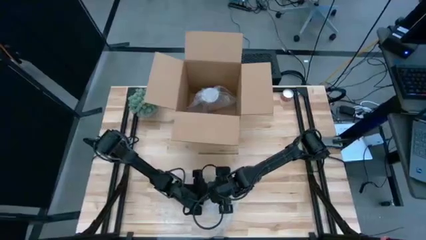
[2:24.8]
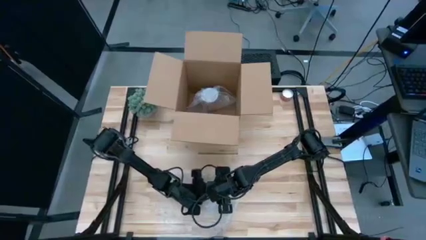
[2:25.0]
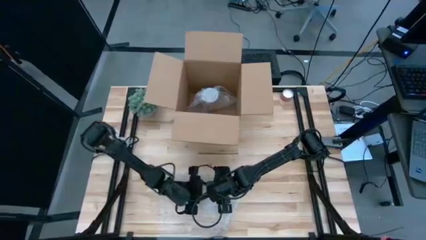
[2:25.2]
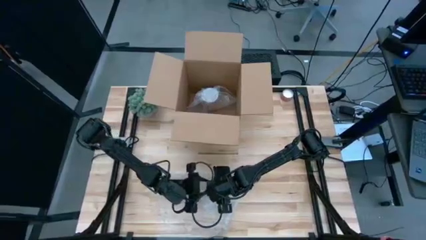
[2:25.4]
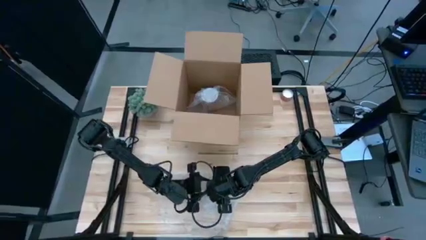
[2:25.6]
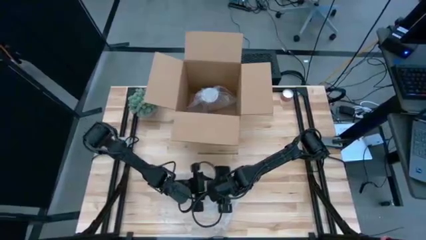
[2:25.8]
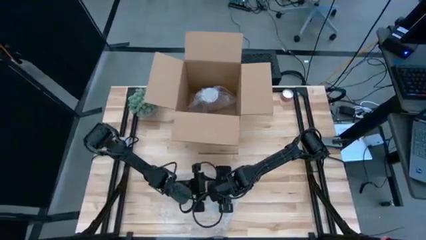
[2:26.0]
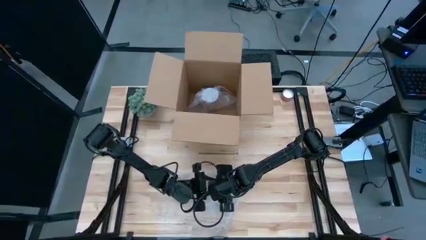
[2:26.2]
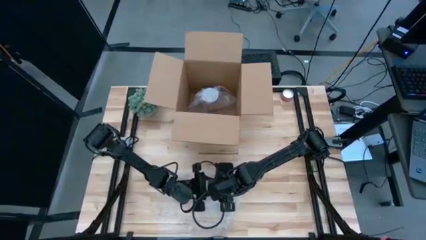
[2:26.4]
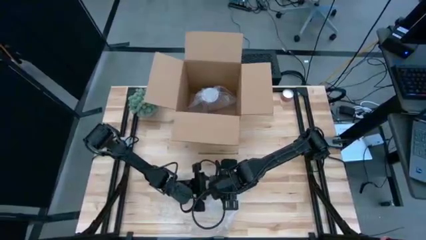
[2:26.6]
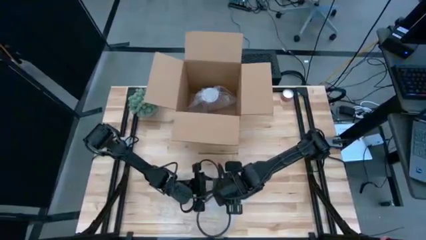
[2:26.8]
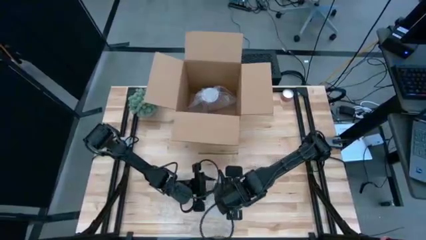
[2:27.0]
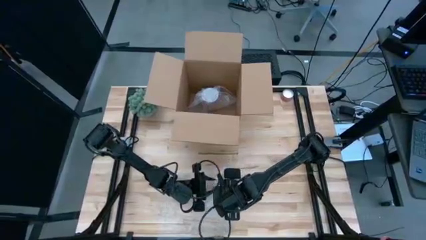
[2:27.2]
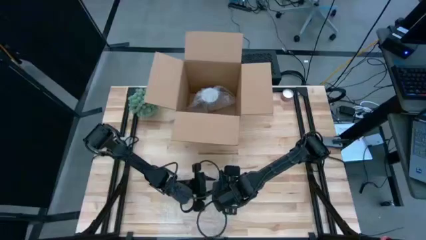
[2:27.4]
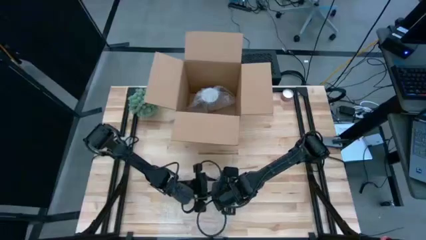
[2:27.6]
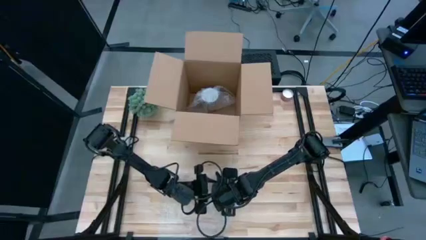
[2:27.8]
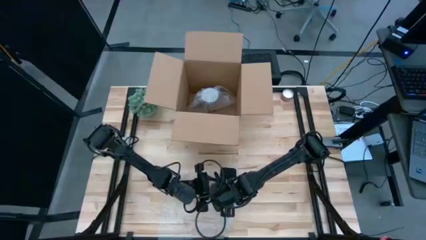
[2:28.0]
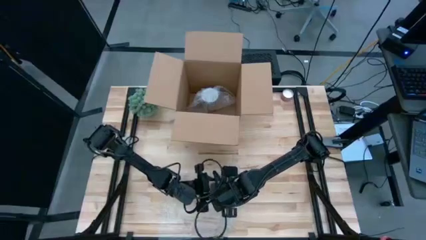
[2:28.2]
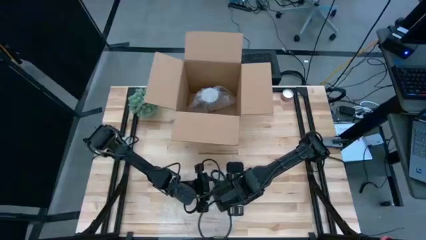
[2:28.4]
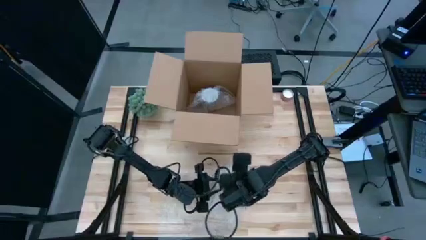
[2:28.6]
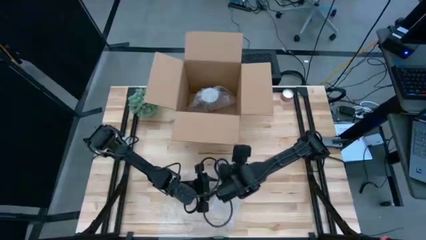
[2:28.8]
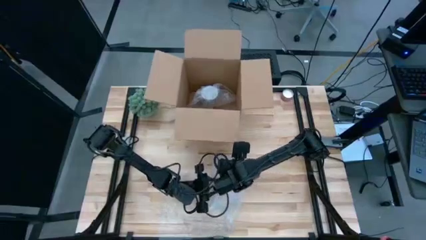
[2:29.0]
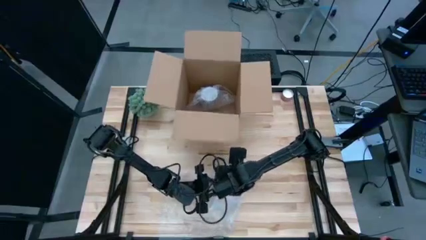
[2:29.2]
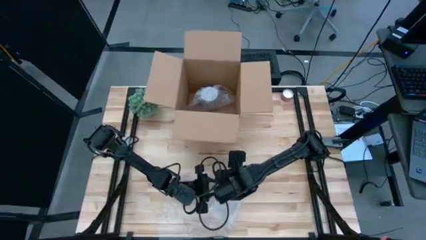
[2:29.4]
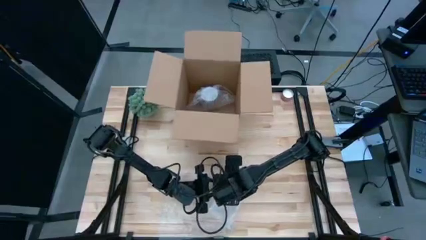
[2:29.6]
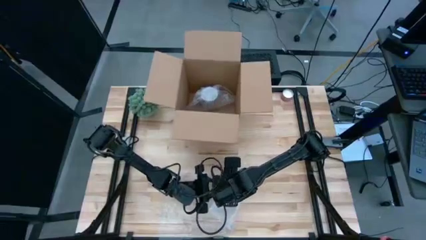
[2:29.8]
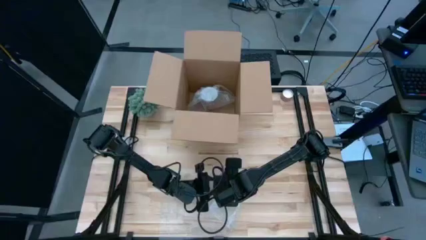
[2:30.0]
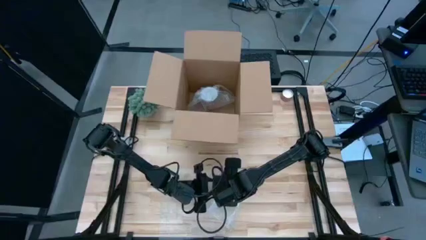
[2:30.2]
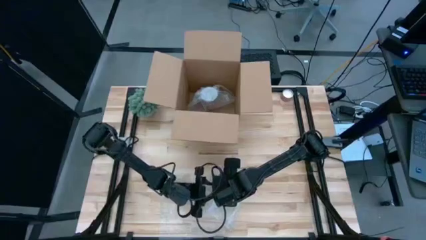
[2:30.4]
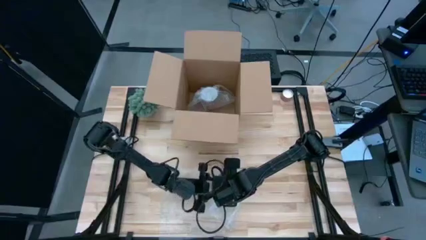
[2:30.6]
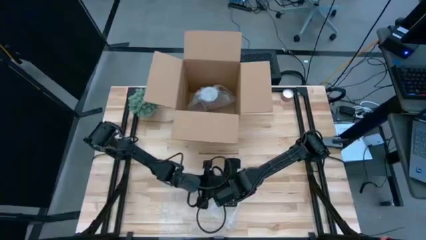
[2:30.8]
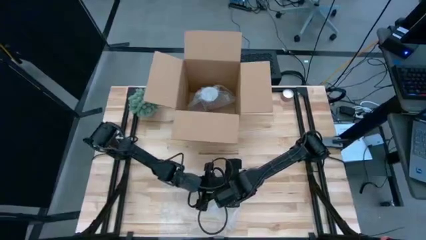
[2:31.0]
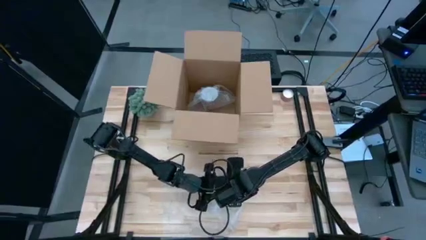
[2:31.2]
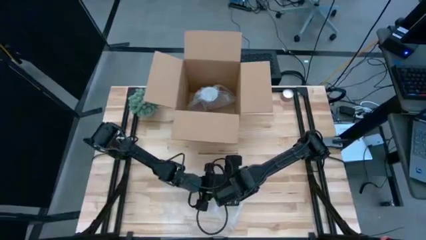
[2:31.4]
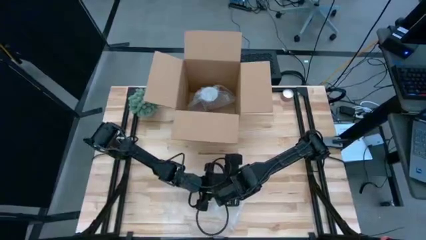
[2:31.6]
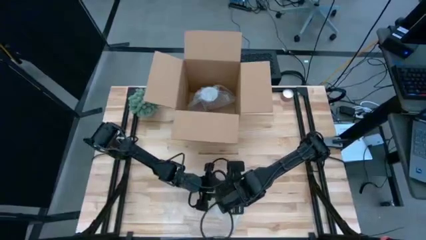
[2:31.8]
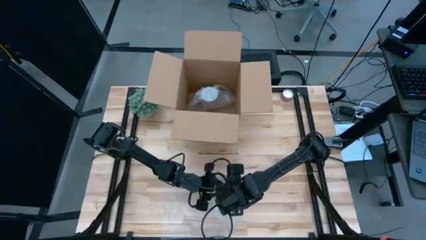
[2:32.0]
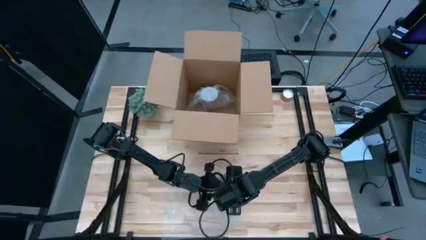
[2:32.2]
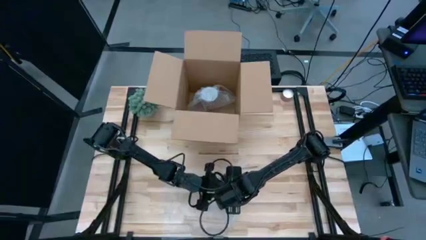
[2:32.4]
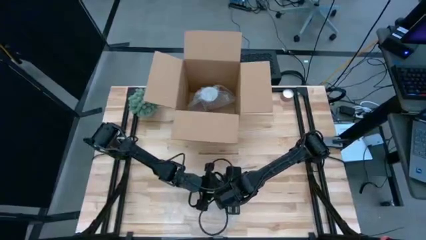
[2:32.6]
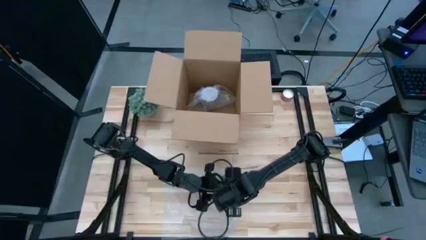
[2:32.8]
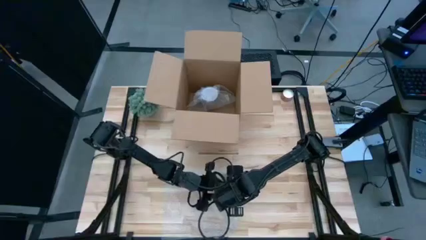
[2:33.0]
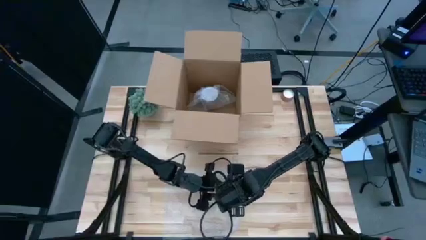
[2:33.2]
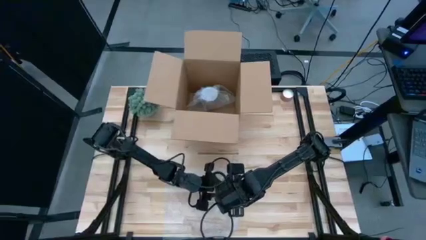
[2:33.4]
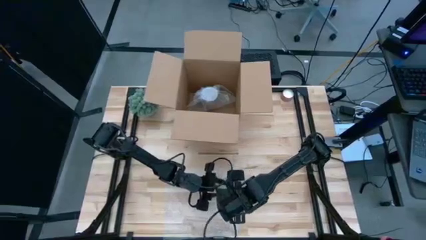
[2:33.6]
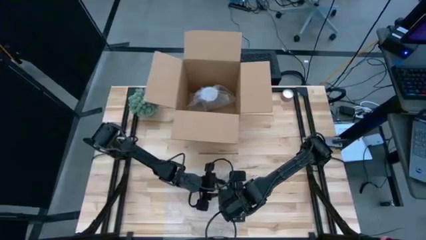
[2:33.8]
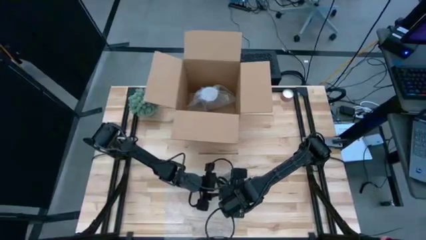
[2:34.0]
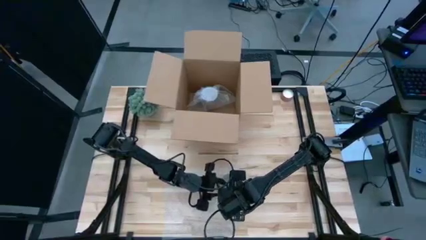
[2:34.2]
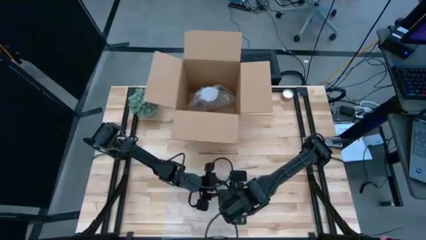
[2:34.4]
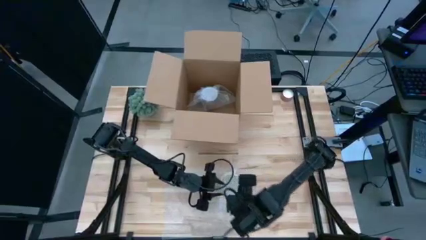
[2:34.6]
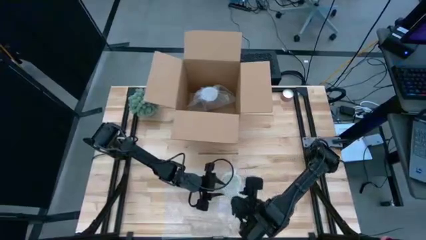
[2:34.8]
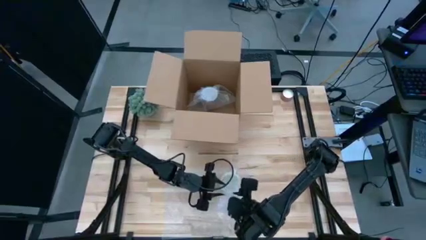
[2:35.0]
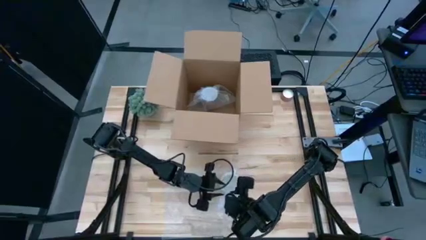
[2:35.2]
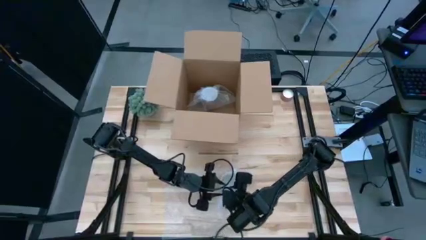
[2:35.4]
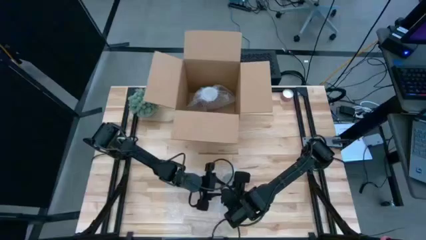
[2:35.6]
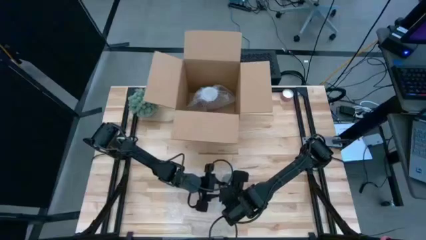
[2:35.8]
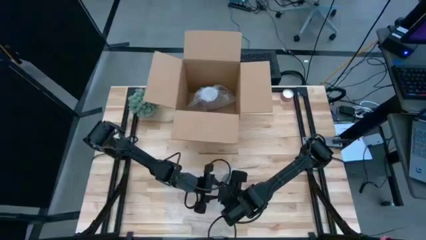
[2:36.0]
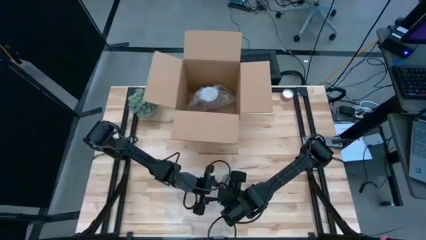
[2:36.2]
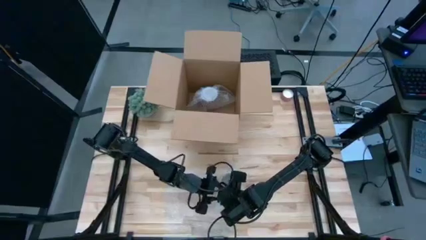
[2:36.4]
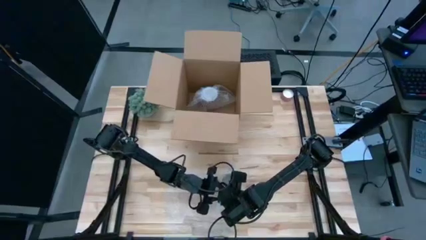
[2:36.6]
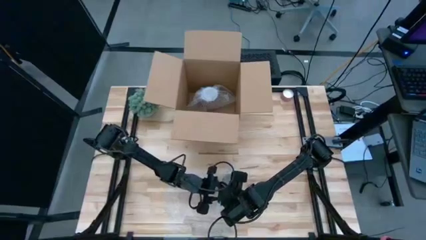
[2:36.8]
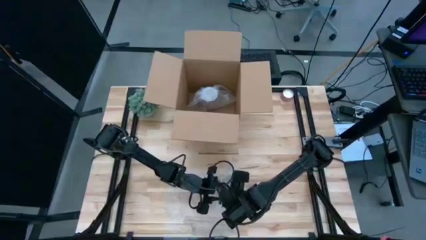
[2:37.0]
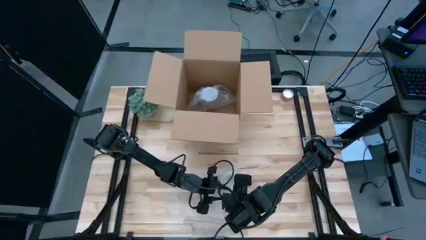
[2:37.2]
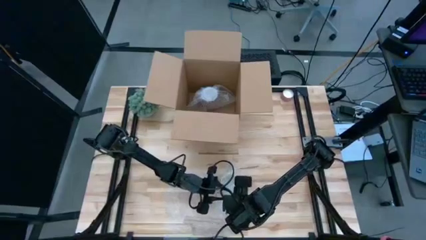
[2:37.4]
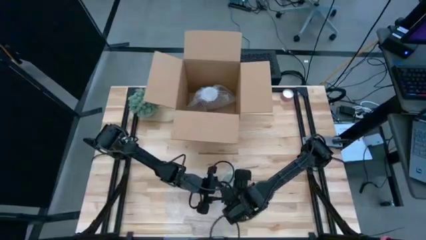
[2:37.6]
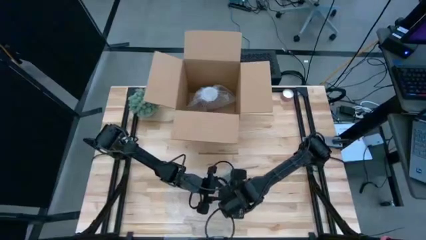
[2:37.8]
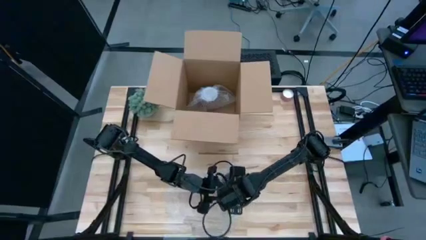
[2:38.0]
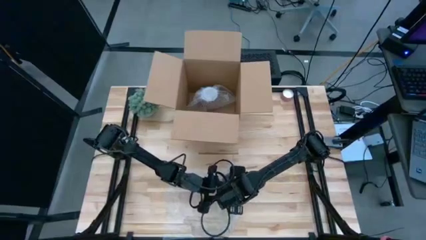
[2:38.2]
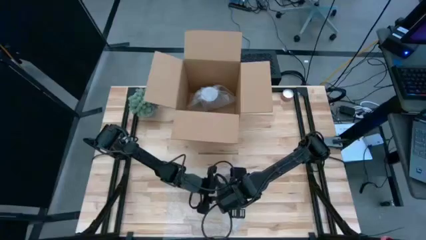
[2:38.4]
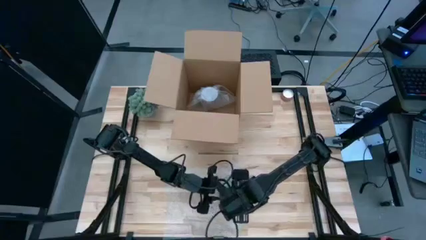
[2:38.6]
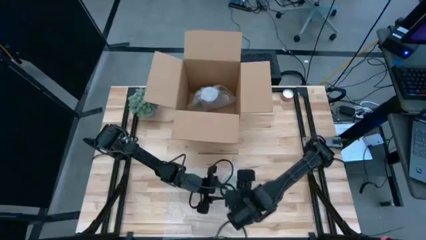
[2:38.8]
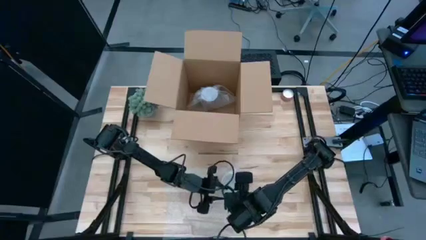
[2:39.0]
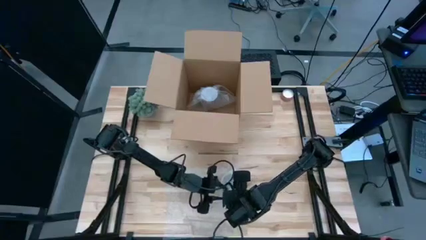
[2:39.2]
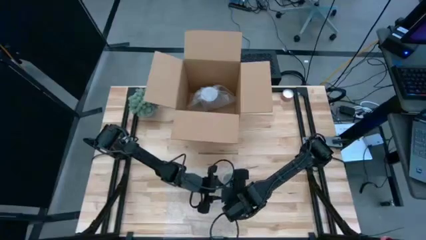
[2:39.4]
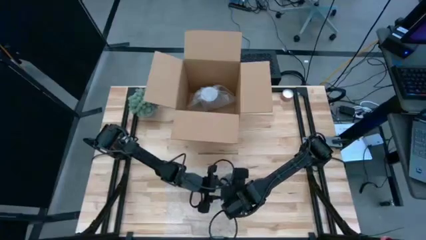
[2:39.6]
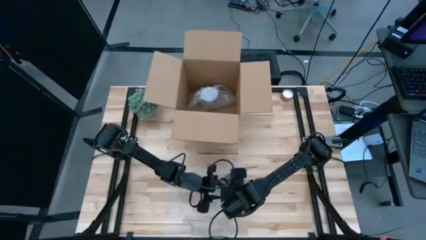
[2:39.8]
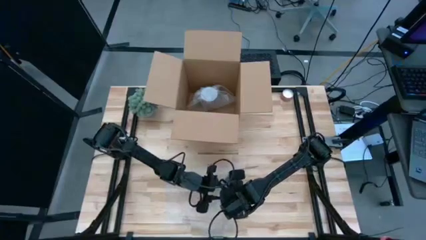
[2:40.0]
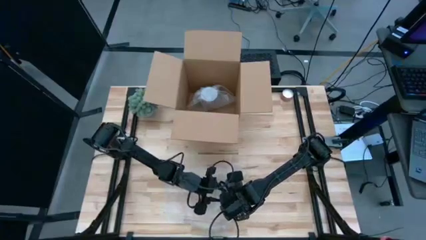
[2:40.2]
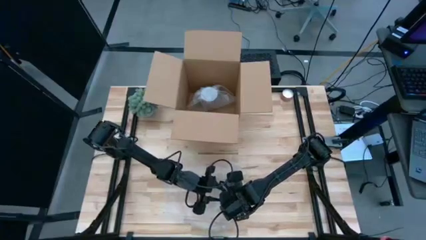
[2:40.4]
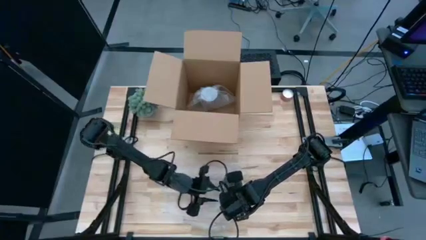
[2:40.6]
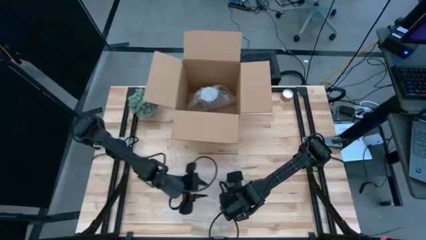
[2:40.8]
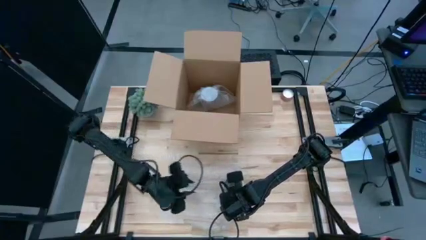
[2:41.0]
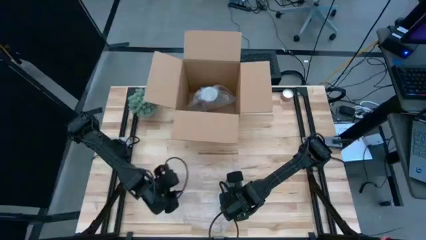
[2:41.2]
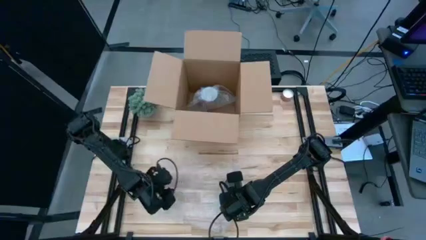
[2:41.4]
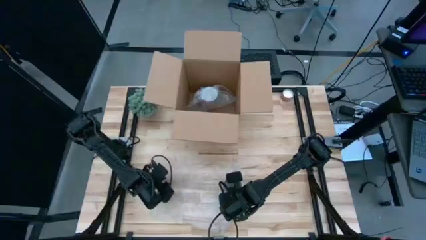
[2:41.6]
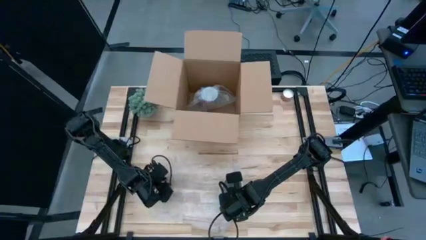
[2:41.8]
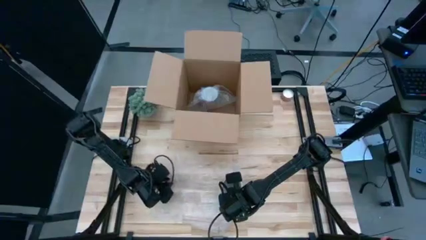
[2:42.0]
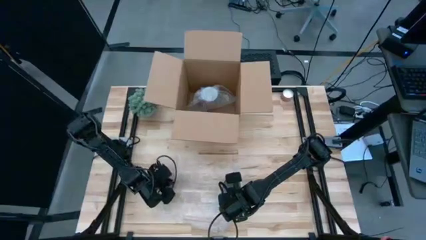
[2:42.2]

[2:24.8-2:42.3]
Task: wrap mug
Wrap the yellow patterned mug with bubble wrap
